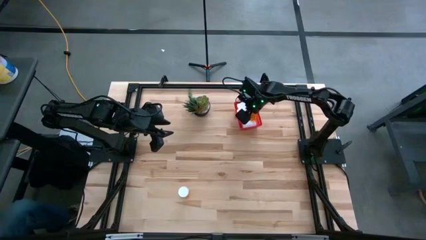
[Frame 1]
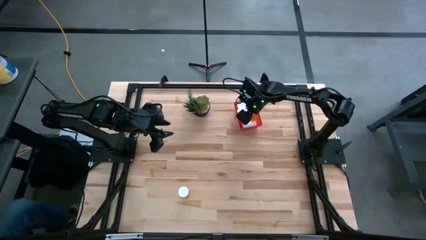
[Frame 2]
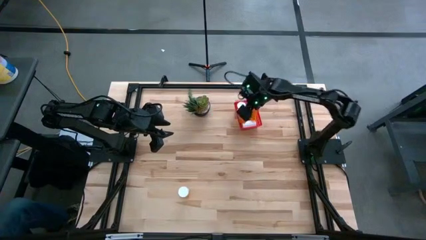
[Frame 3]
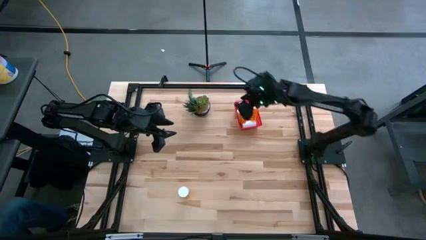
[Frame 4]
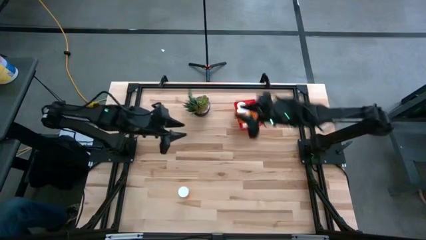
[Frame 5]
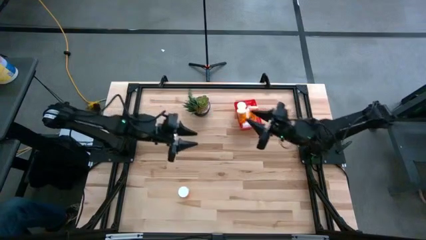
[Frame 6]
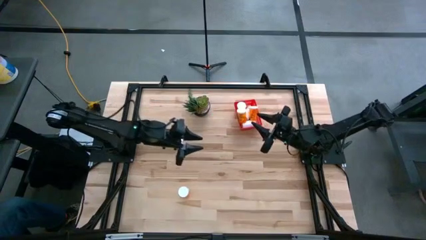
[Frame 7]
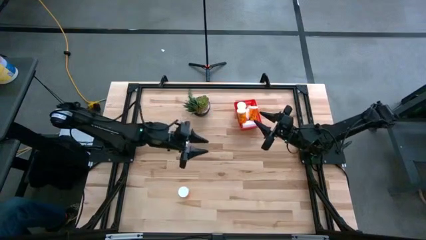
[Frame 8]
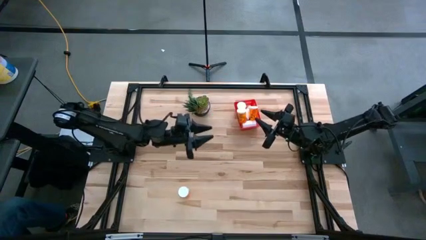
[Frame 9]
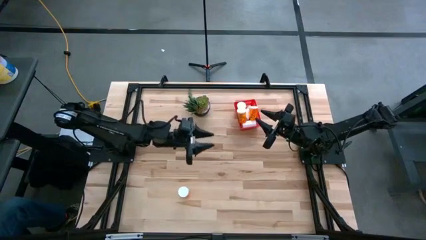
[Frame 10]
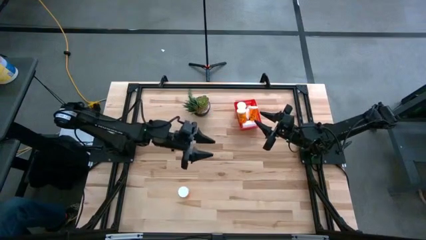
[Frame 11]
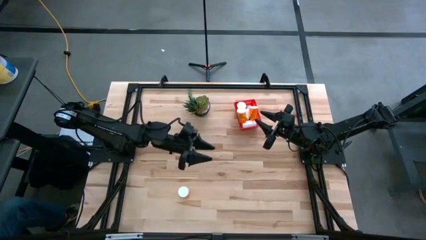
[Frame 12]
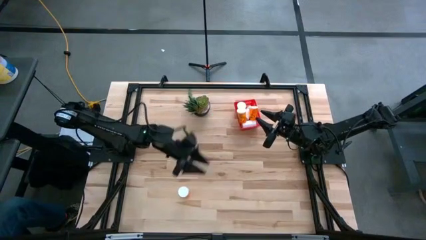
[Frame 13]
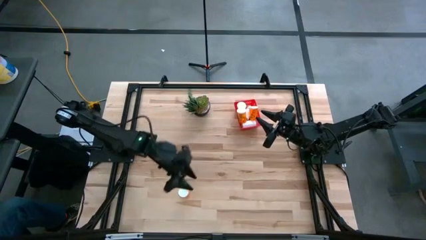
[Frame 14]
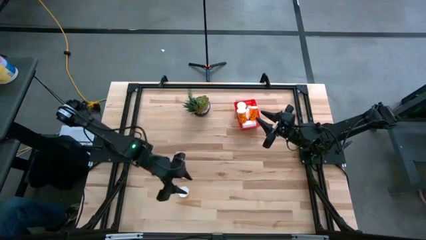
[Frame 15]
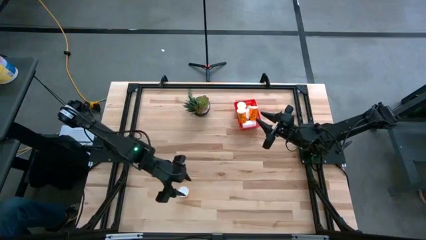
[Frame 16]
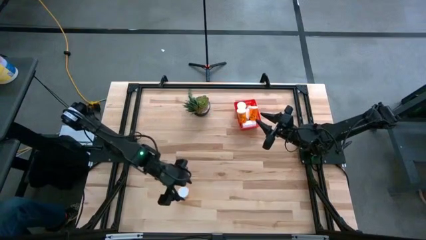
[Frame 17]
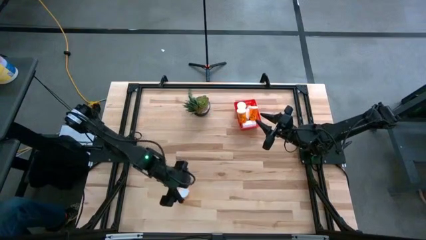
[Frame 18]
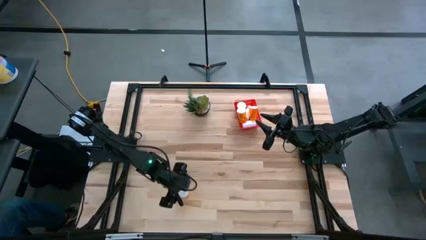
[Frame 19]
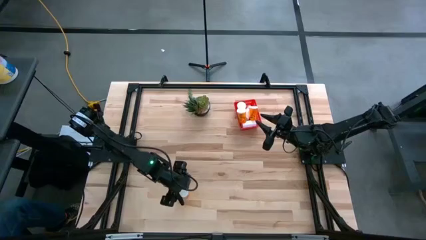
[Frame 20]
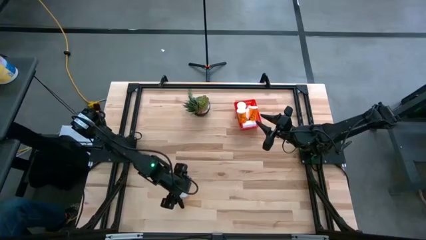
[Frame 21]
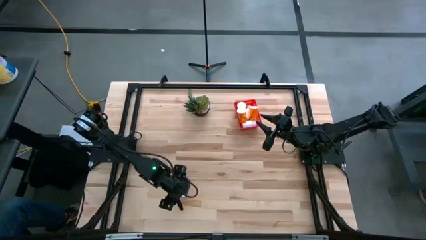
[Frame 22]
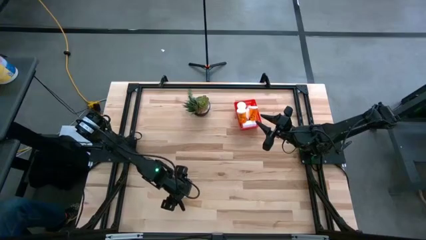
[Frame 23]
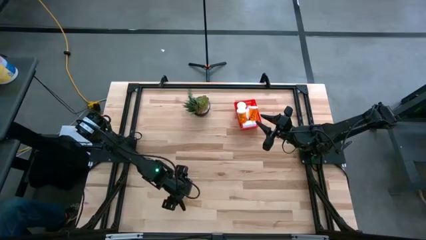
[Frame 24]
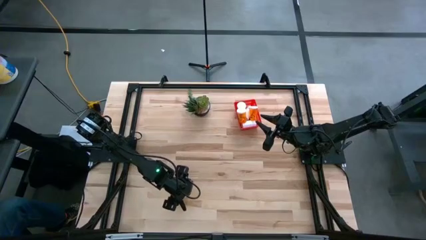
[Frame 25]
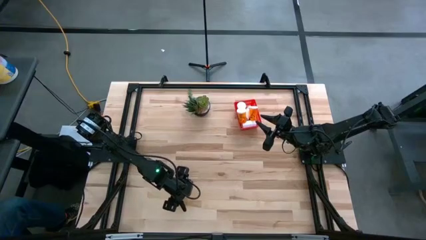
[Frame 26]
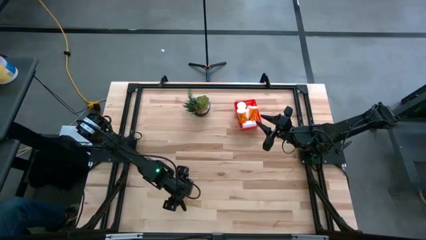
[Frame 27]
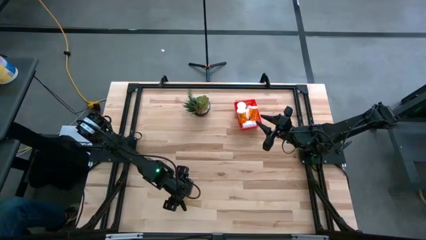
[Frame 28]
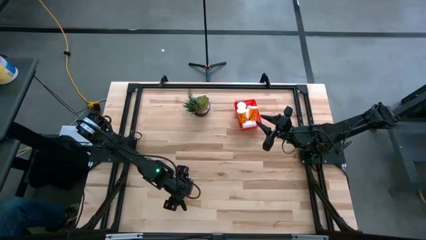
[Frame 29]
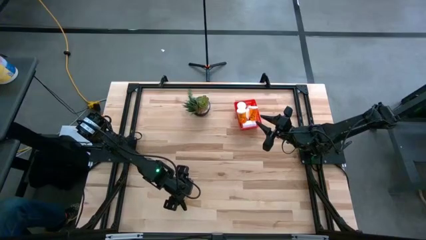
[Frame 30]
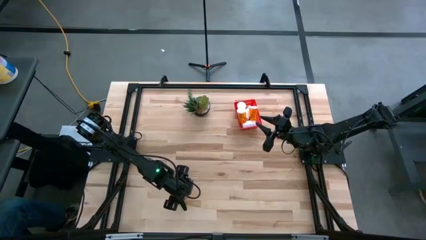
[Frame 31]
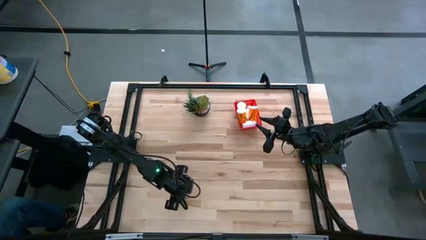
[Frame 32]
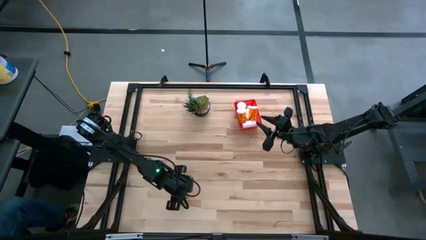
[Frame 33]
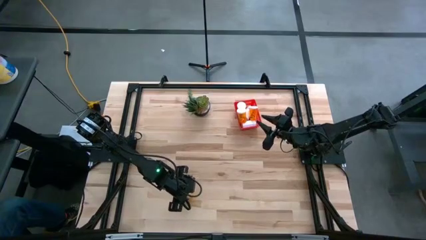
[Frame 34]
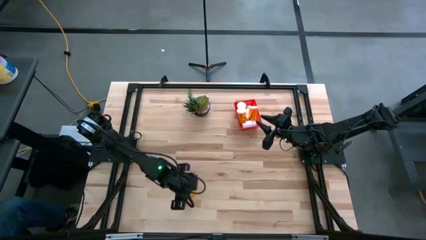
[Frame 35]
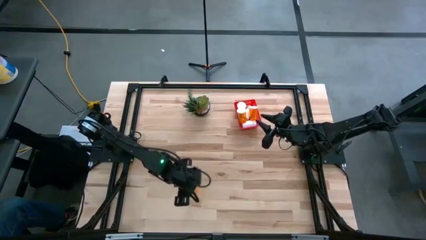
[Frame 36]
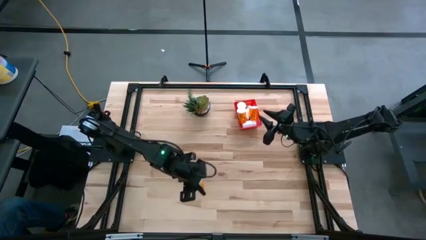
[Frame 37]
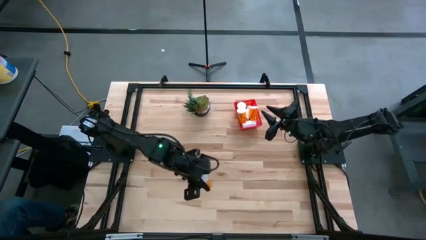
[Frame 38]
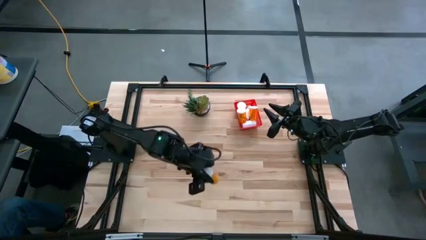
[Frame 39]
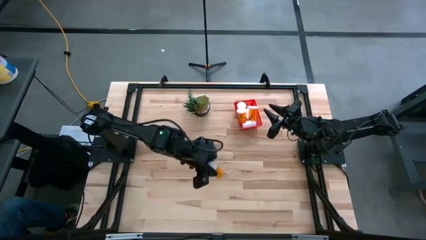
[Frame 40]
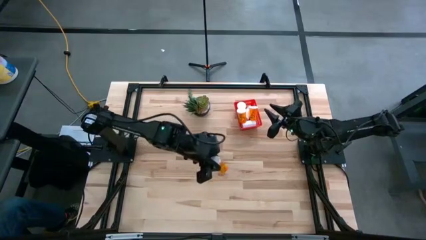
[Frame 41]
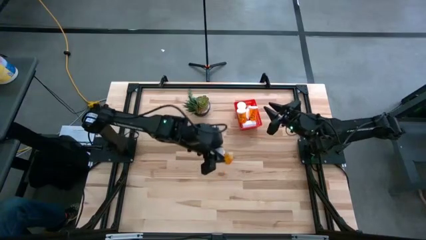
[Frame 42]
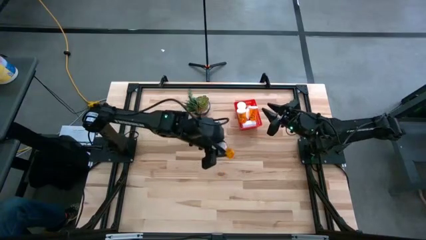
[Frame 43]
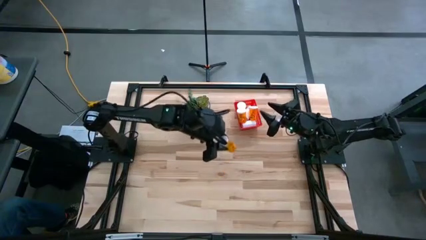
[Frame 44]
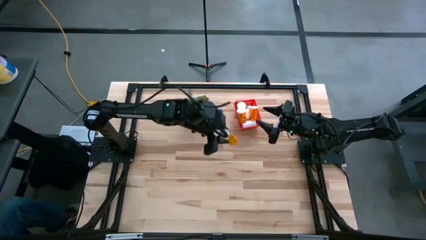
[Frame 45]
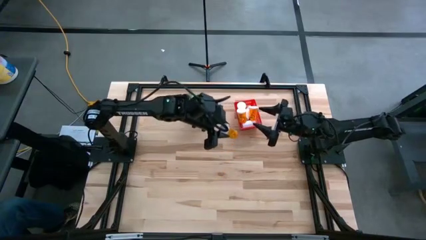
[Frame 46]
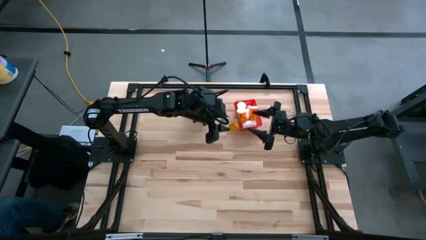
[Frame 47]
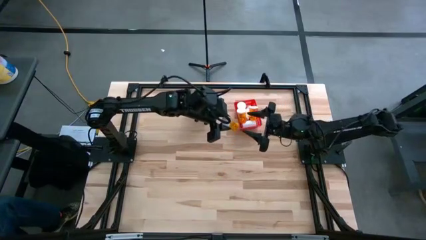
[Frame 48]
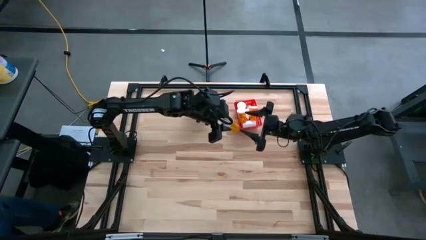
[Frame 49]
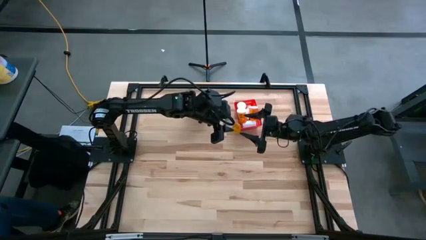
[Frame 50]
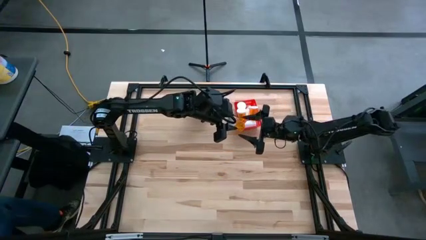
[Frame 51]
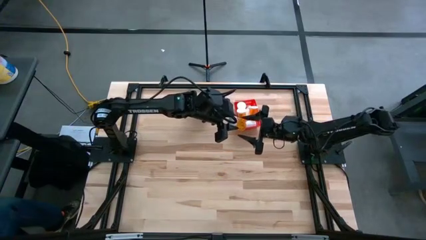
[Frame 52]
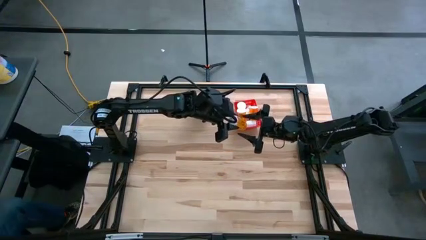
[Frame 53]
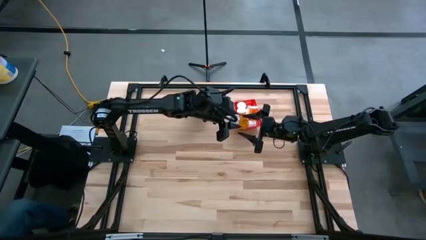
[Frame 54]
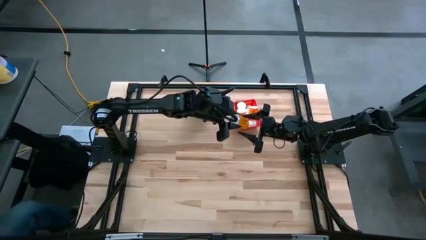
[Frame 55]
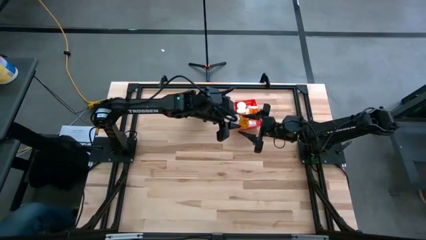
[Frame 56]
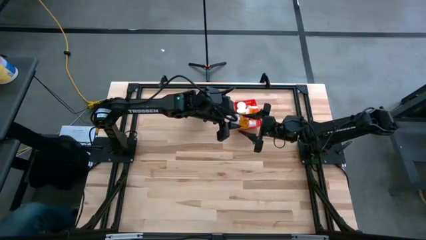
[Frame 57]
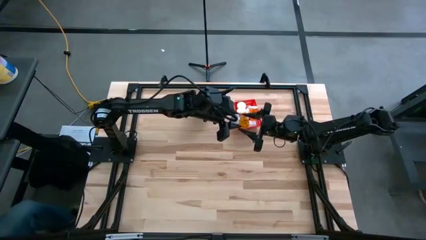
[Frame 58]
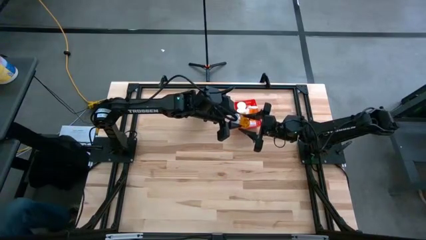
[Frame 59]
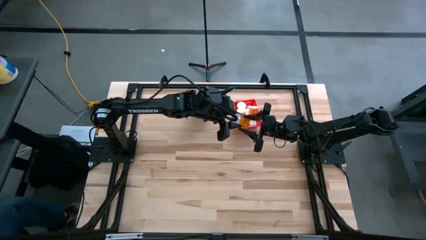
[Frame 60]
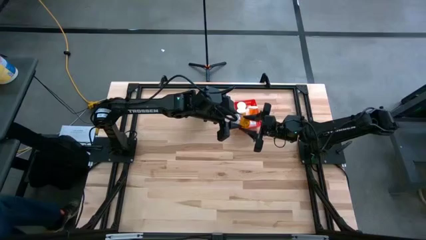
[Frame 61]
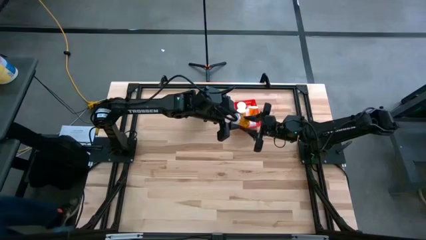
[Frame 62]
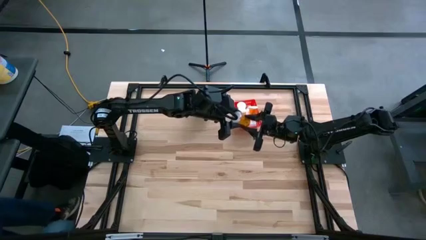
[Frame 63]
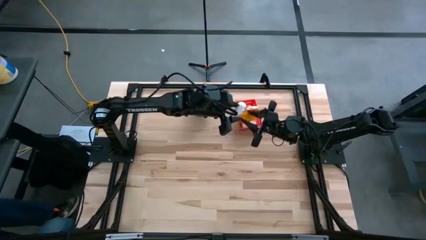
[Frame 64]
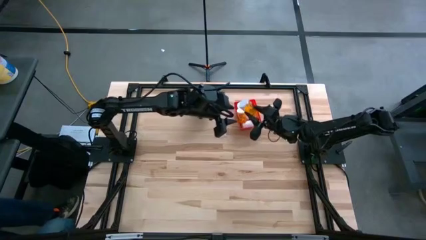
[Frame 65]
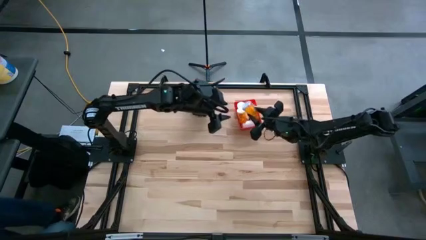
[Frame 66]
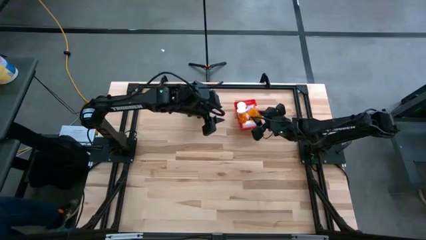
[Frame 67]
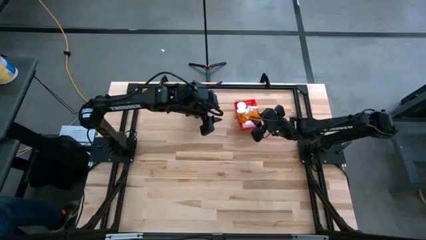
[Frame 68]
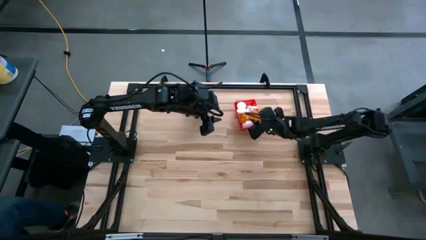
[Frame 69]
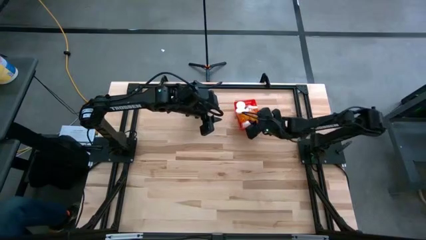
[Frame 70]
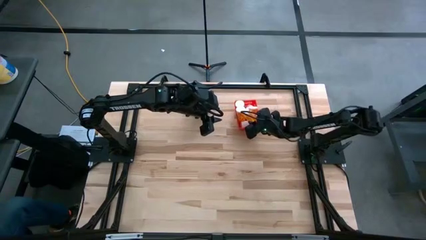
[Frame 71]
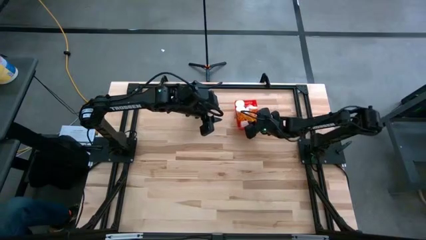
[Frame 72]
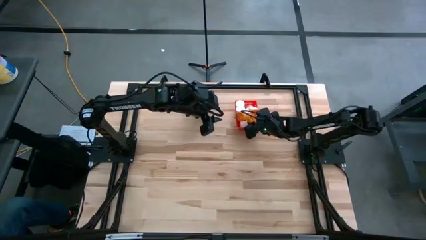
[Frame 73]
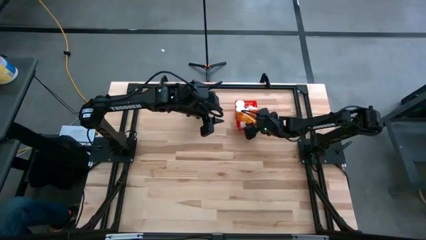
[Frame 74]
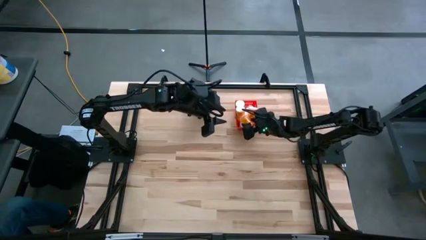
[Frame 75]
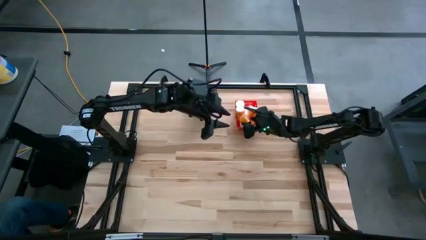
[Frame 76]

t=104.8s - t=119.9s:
Task: Pick and place pill bottles into a basket
Put the orange pill bottle into the bin

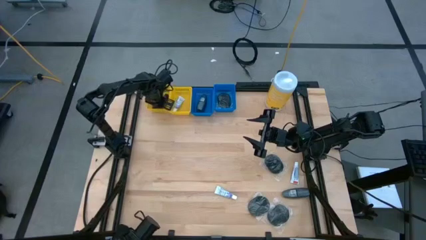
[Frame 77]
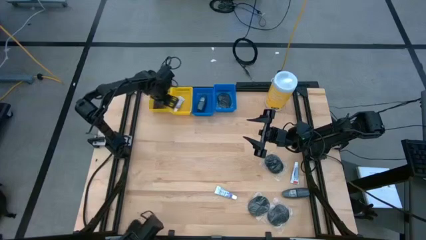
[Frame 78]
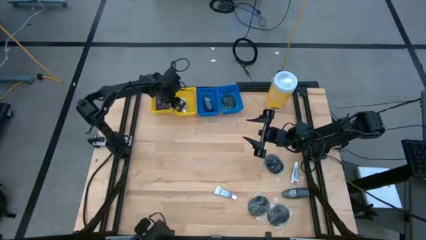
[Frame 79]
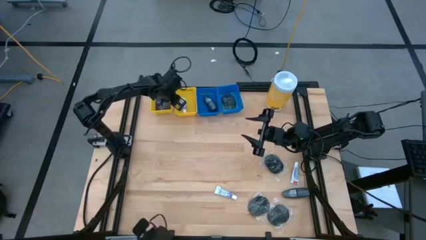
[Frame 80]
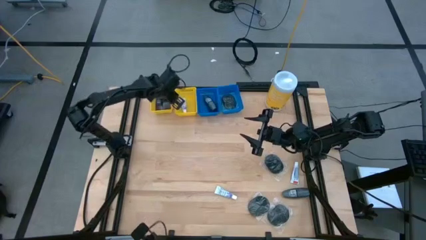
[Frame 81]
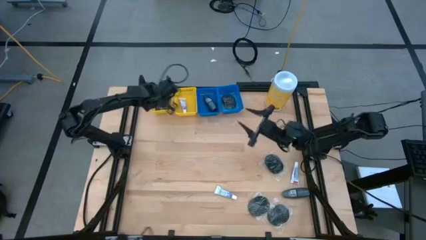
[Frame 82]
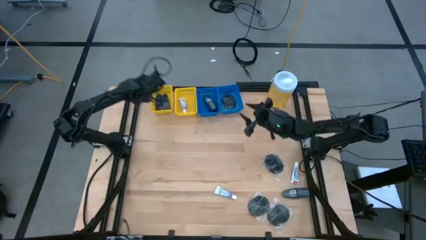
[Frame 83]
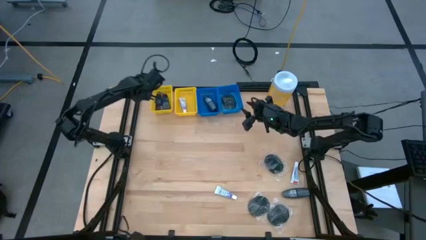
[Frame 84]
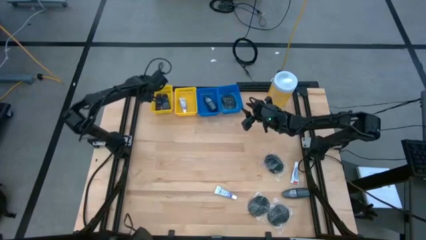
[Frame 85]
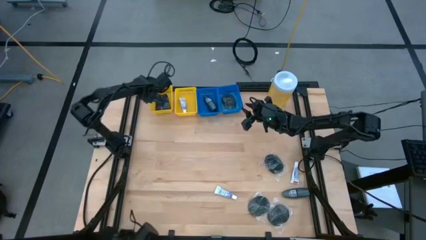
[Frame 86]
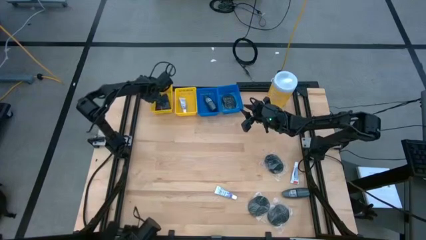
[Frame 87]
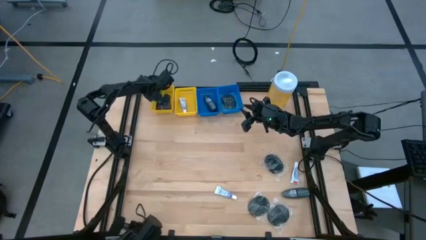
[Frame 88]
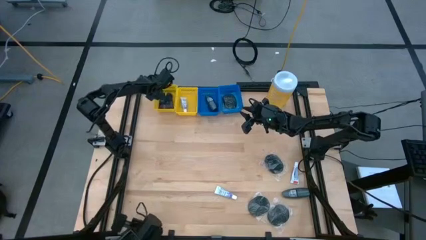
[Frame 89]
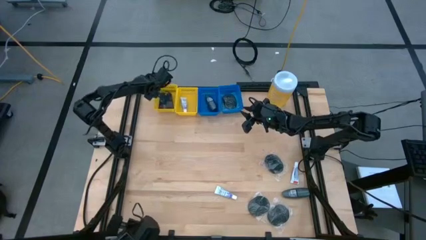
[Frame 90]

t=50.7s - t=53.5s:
Task: Pick & Place Travel size toiletries
Adjust the left yellow bin
